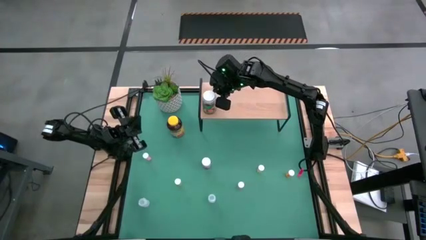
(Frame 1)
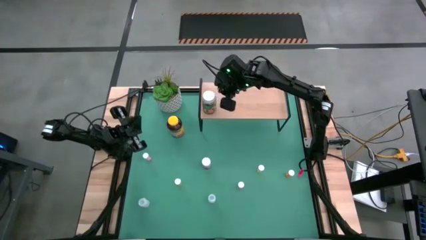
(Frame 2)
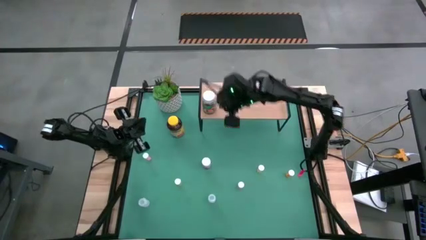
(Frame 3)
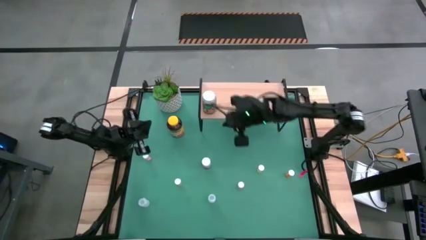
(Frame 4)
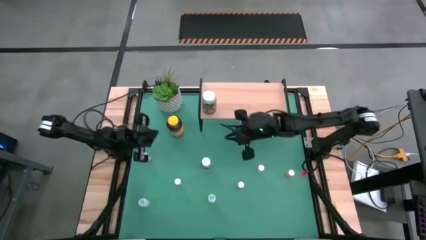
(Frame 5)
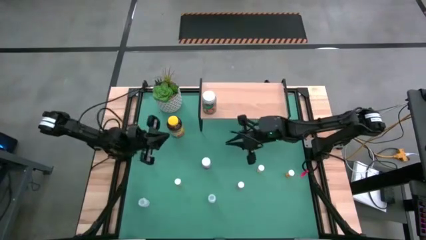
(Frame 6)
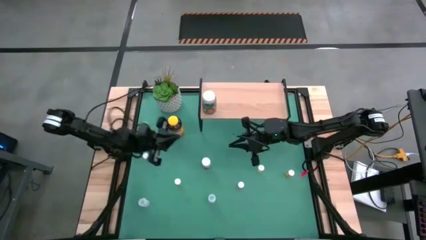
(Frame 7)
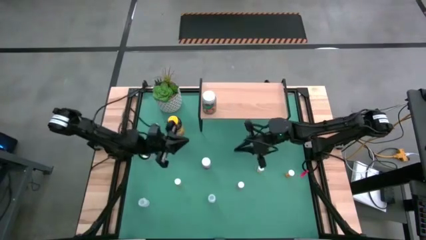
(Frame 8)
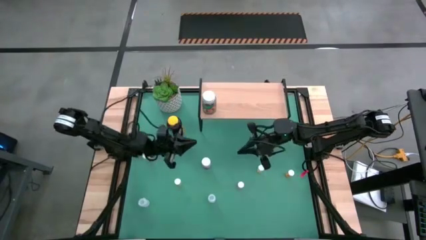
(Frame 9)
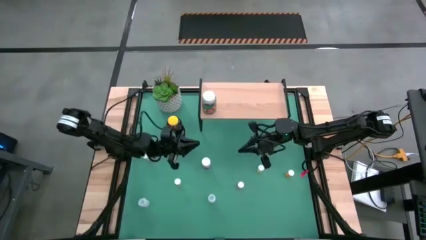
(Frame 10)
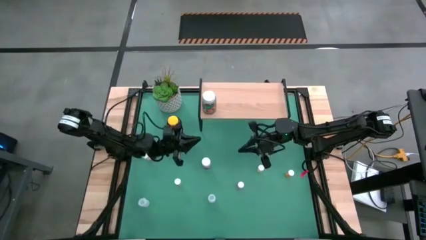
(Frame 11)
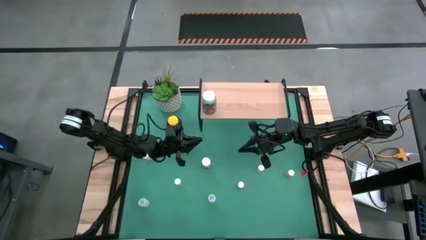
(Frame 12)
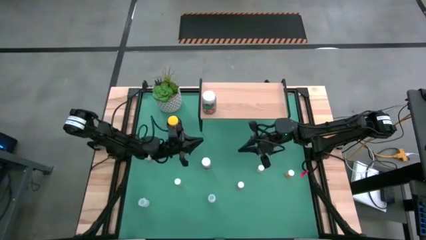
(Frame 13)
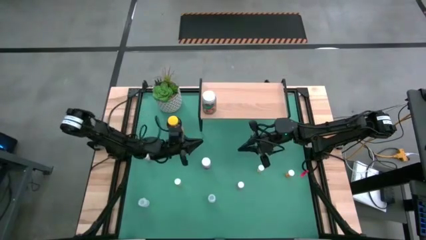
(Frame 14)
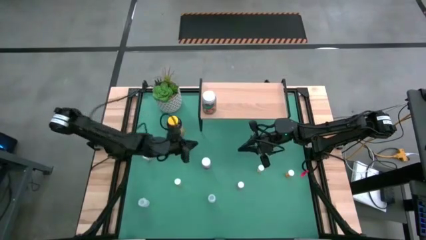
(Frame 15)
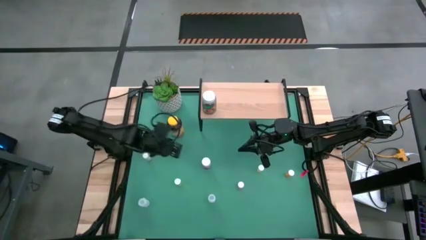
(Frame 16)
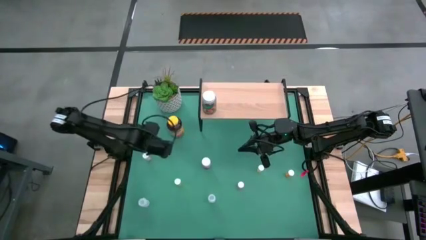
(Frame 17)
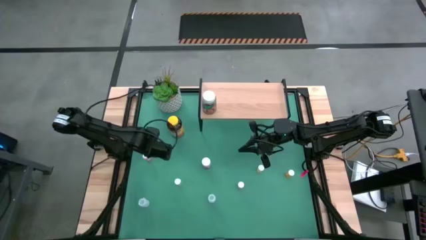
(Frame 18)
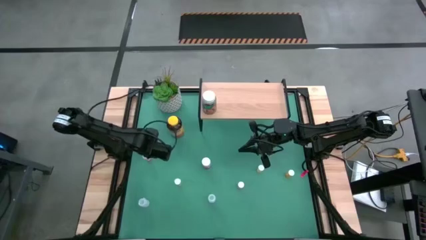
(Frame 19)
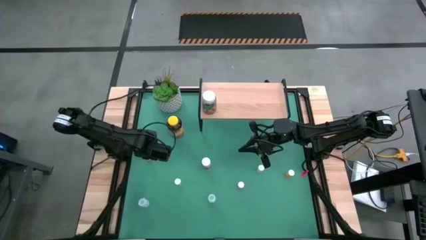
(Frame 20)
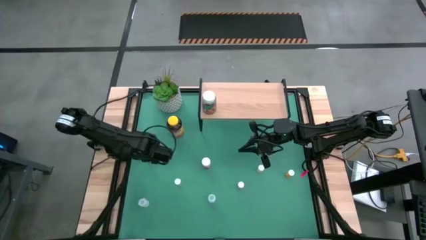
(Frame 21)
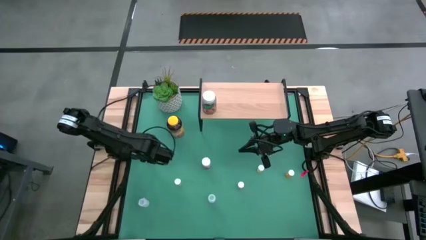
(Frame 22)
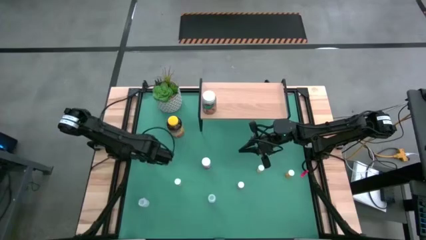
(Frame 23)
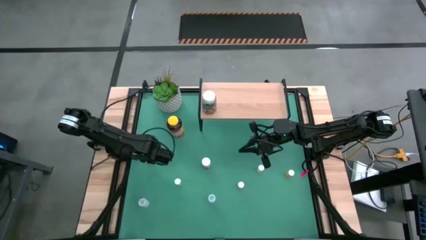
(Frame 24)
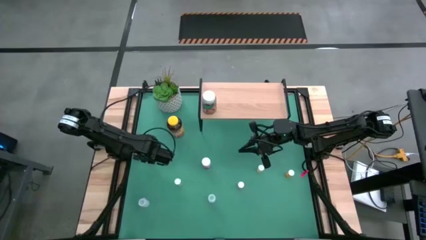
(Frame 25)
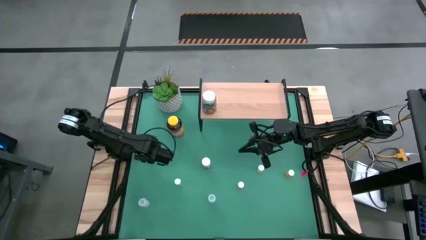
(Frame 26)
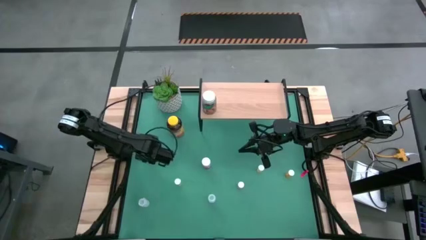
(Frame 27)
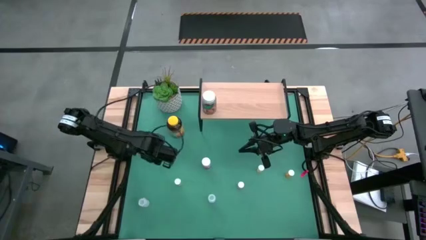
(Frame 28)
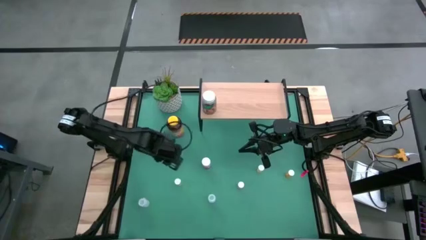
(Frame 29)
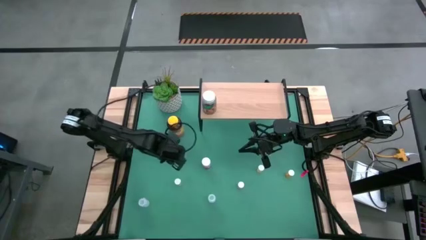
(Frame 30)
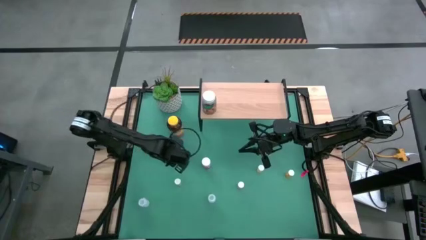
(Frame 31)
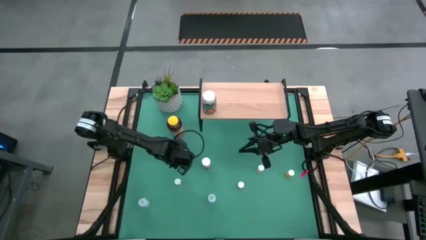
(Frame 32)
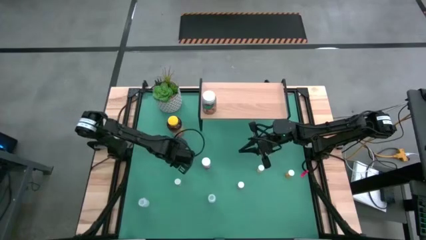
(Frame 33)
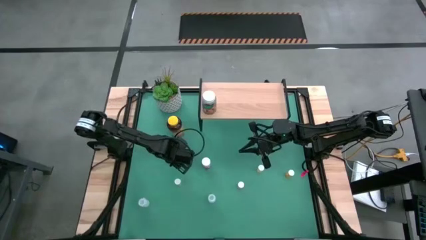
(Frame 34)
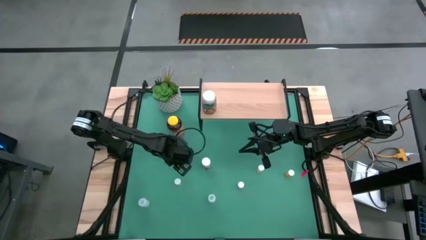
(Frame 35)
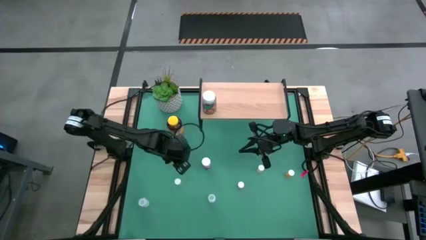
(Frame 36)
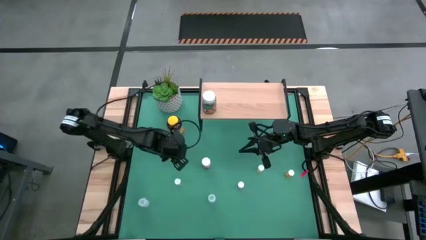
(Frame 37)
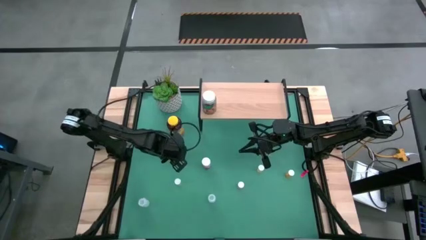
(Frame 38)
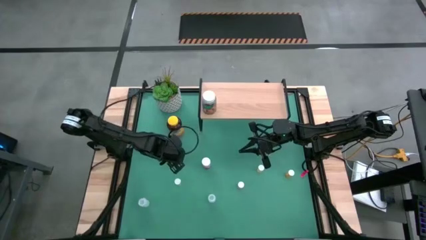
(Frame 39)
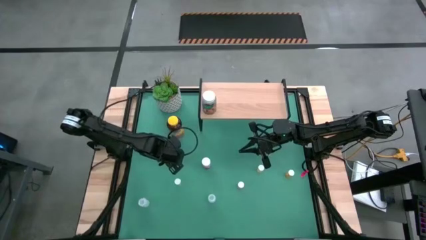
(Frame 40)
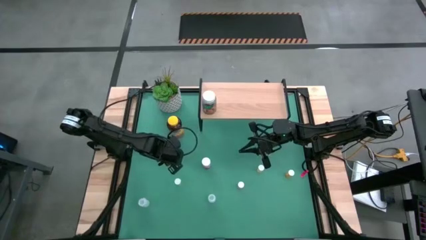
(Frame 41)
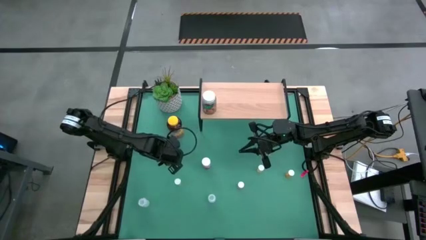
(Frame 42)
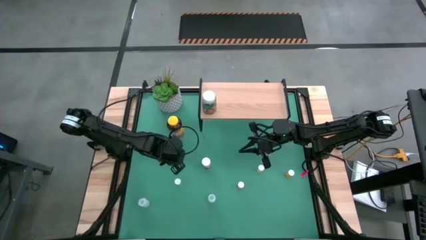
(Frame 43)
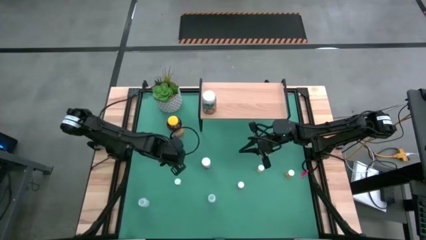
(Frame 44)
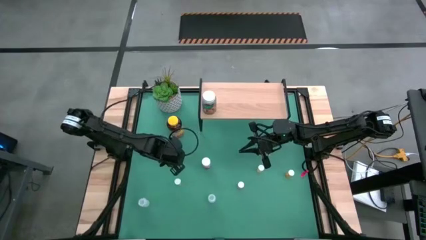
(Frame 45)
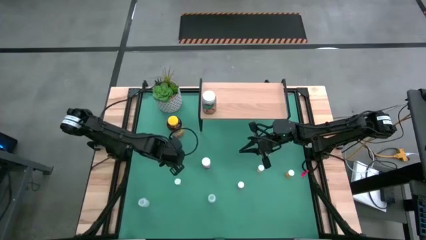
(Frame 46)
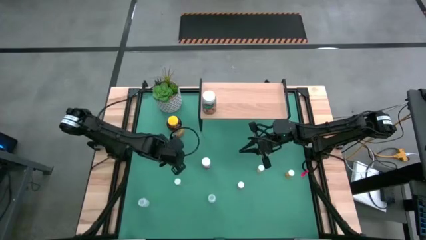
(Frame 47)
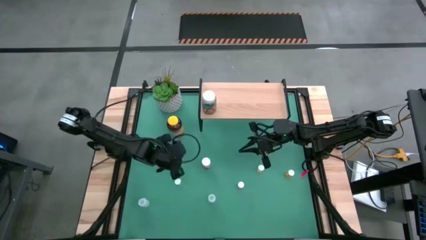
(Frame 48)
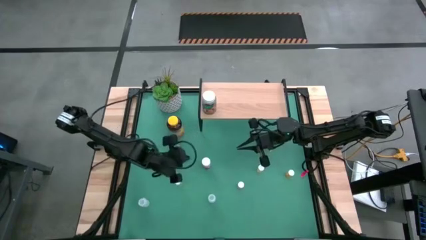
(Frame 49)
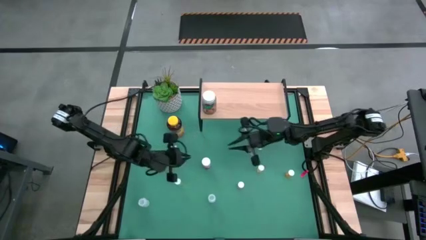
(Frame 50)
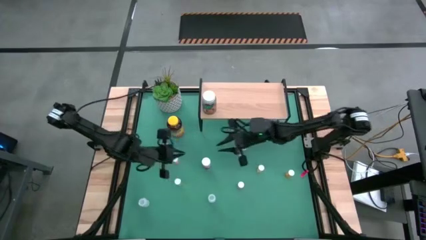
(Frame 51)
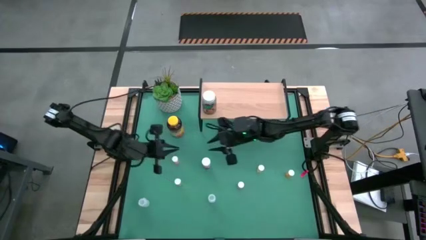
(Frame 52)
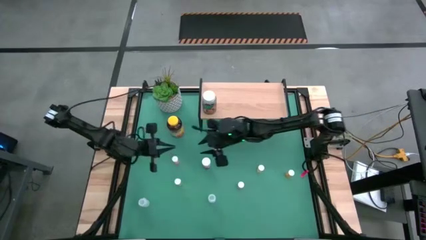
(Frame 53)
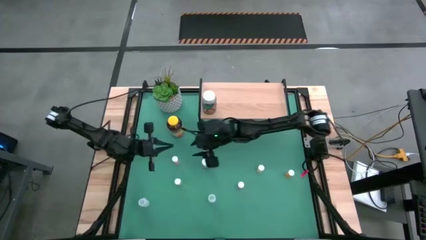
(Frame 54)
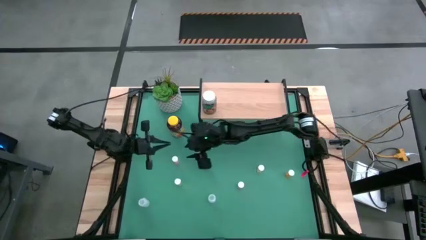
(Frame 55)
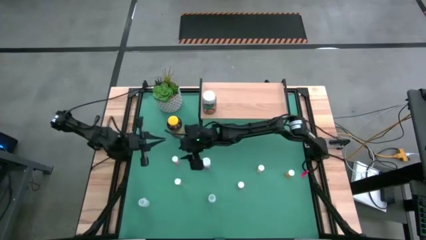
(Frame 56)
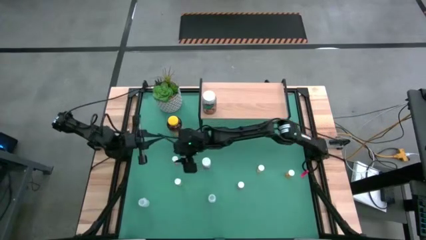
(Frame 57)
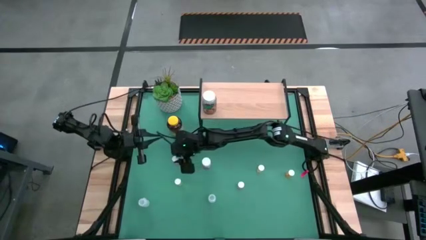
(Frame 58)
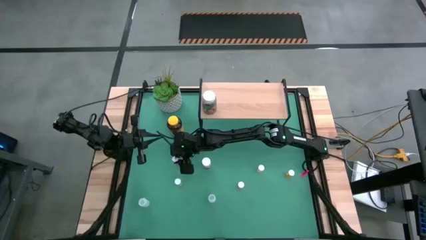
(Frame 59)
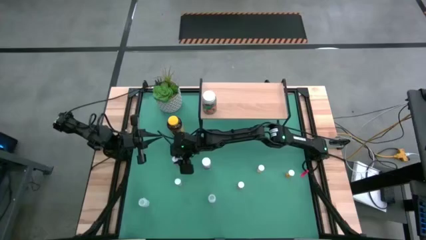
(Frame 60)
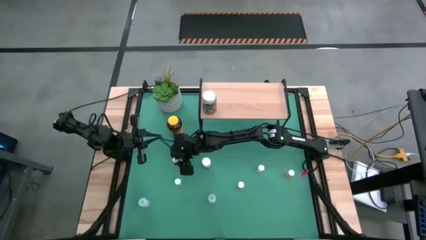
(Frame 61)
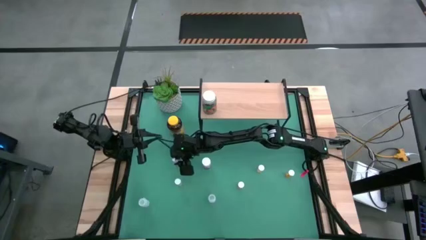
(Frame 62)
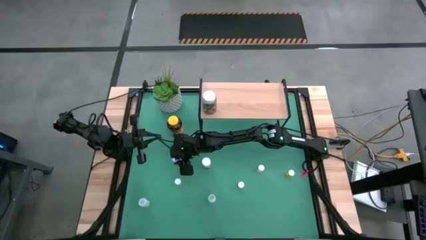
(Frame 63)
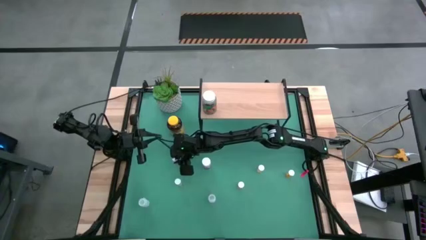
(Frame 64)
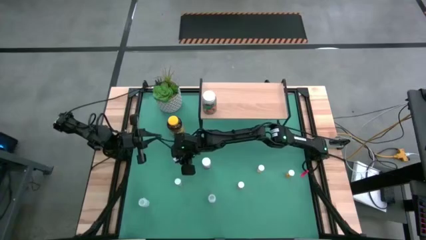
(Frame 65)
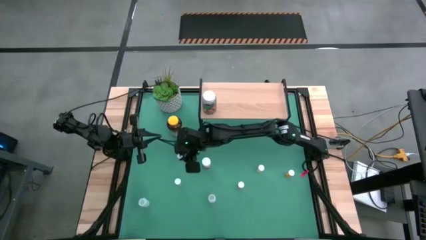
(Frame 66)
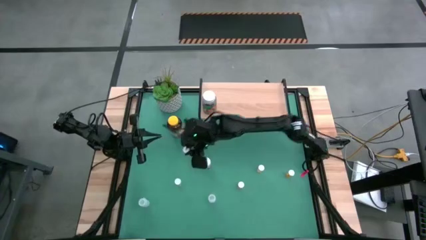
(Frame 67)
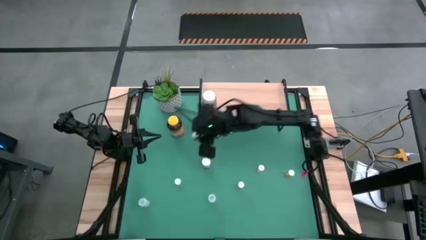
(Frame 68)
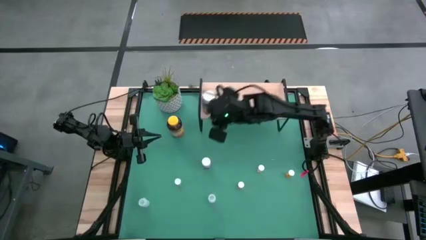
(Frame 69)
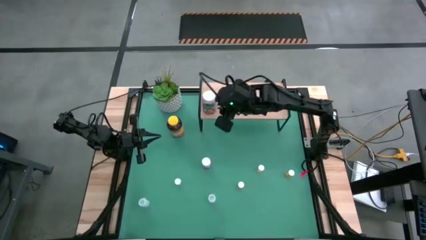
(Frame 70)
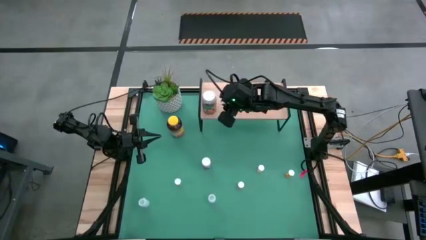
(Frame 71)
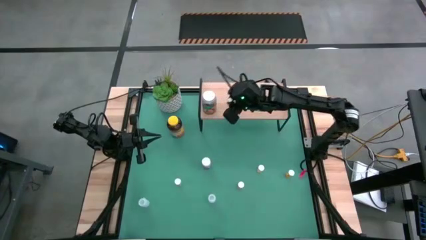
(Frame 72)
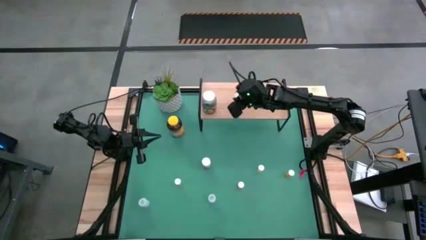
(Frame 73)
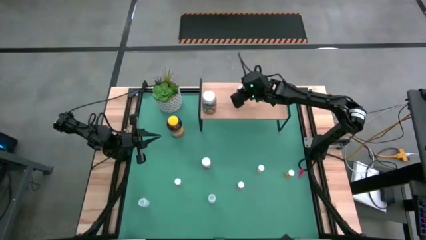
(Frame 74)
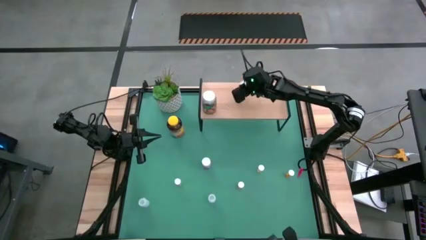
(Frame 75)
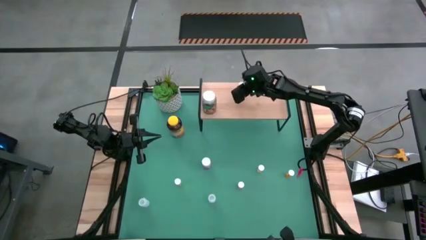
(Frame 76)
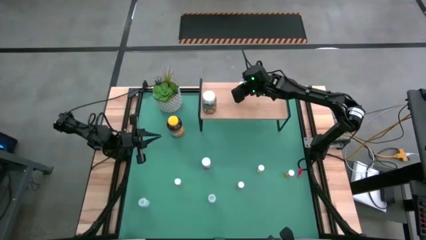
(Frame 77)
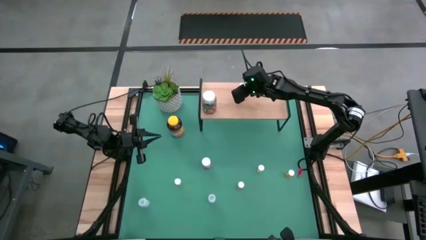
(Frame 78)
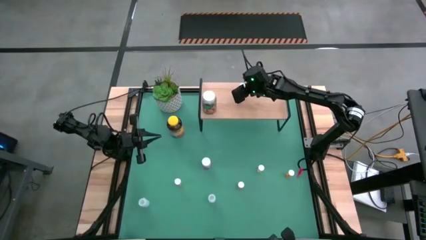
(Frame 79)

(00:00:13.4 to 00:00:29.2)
Task: Pick and place medicine bottles onto shelf by color
Put the left small pink medicine bottle on the shelf
